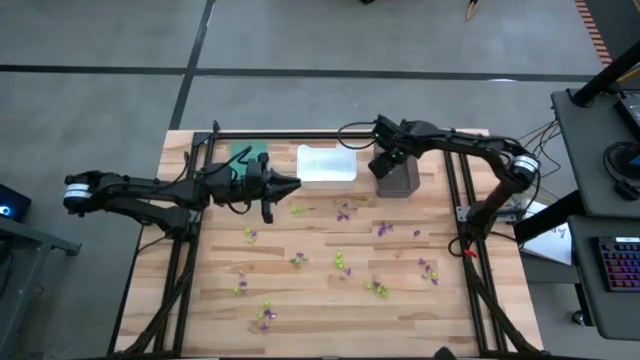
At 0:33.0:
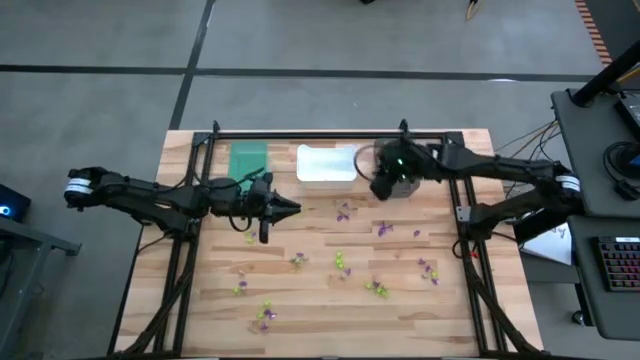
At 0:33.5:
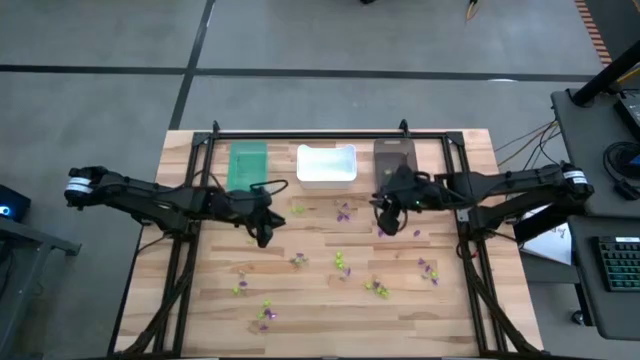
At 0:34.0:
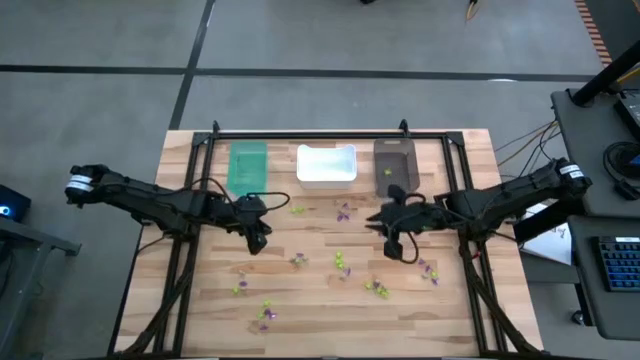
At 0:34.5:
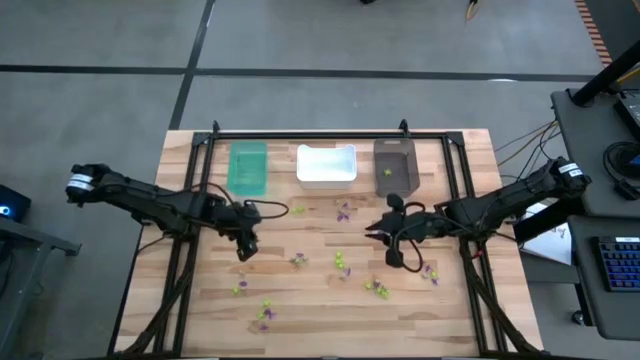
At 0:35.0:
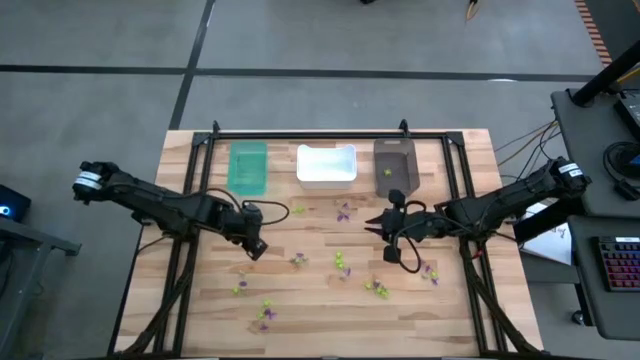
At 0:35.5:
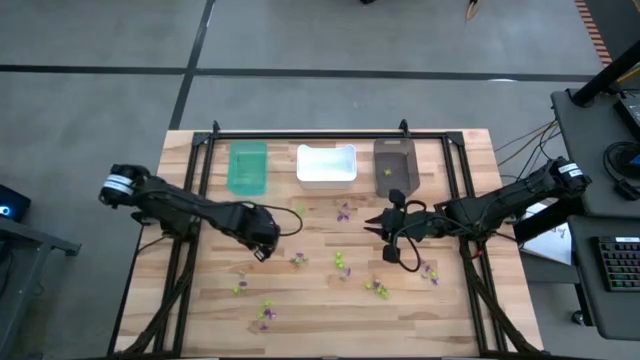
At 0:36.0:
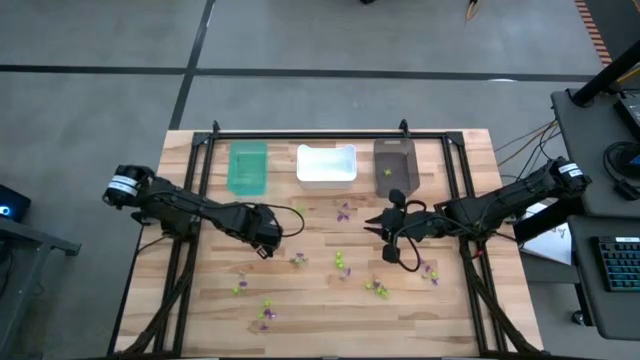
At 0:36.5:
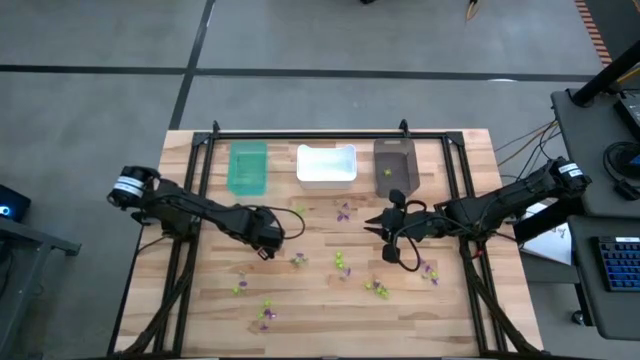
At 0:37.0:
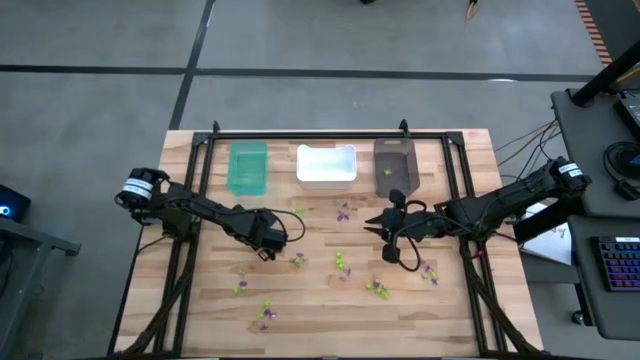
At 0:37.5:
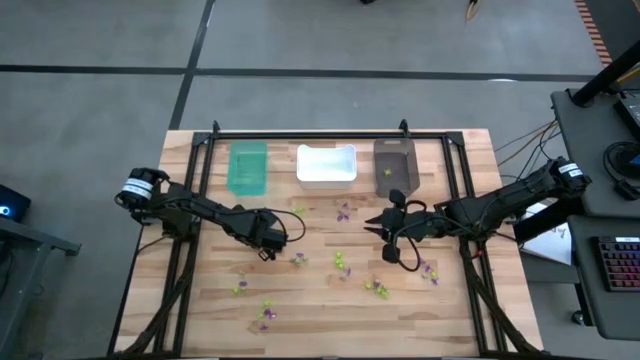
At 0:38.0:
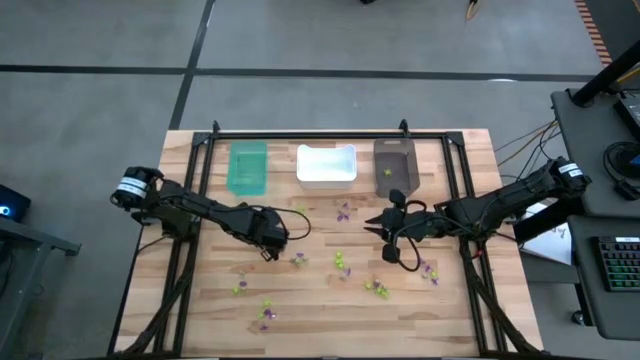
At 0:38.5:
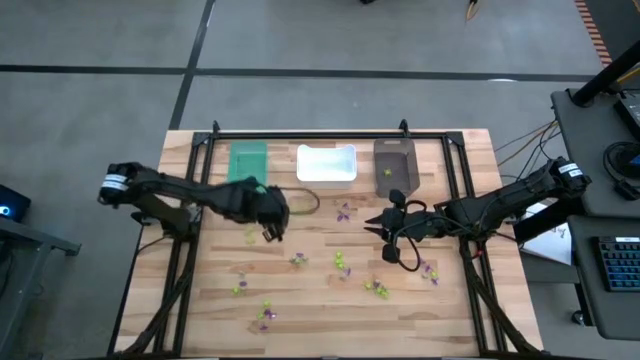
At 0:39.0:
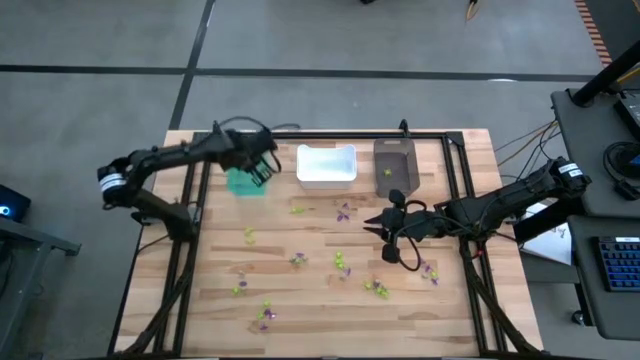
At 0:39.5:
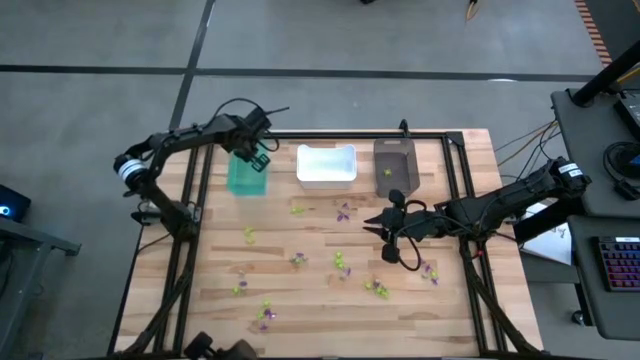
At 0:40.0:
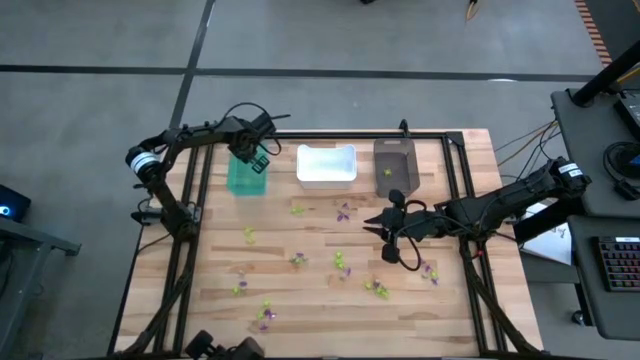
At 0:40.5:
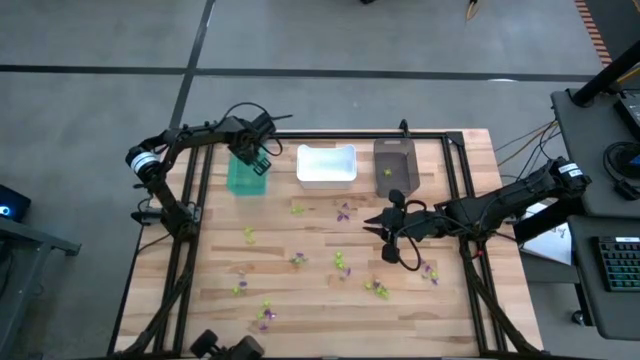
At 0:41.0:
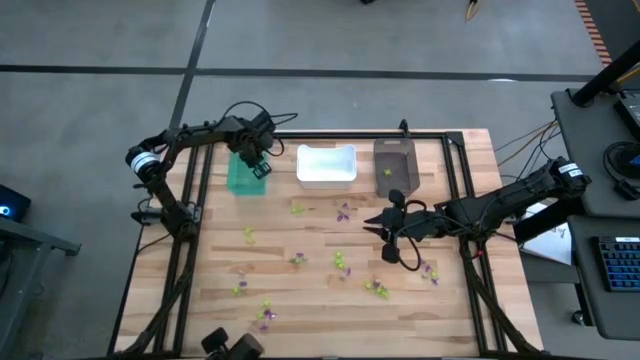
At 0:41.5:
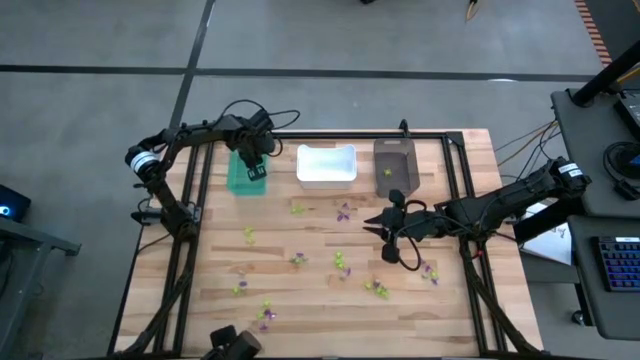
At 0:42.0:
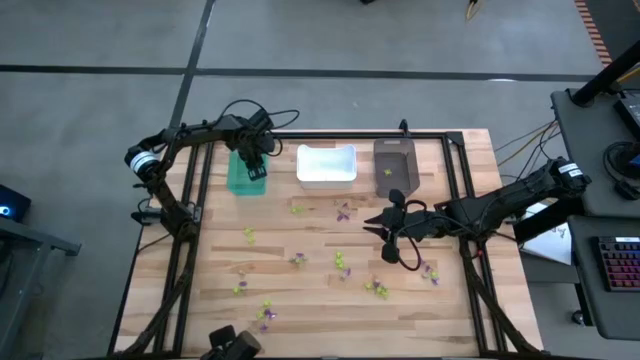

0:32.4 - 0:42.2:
Task: Sort Halloween decoration
Put the purple witch hat toy into the light blue bin

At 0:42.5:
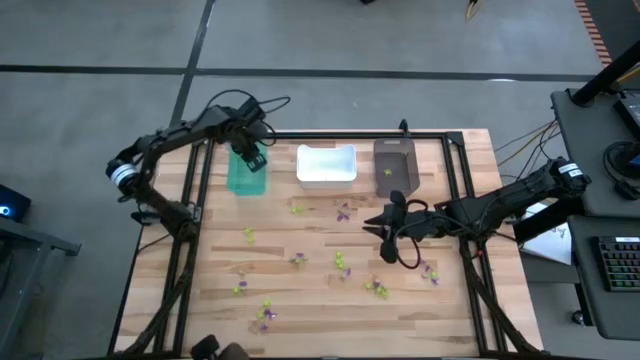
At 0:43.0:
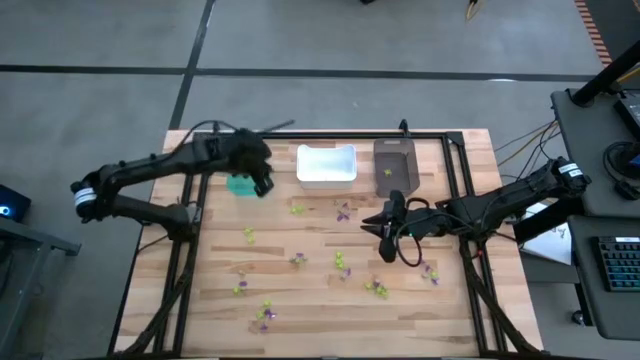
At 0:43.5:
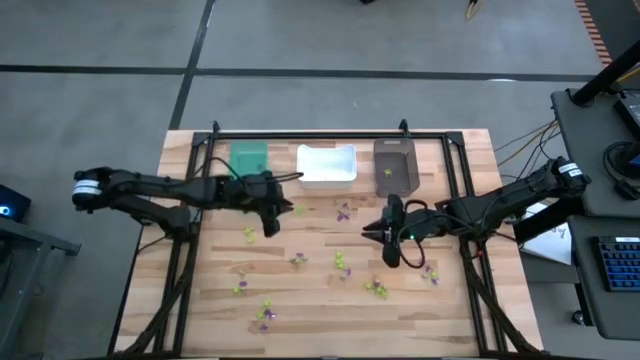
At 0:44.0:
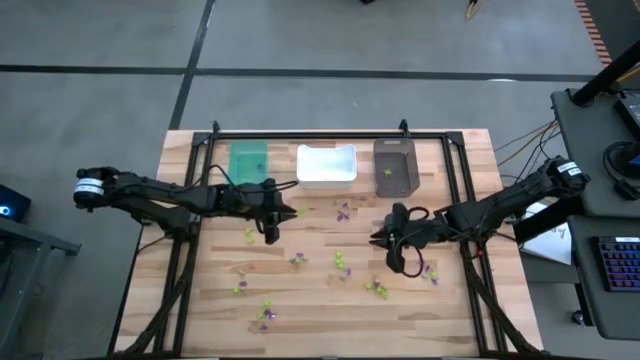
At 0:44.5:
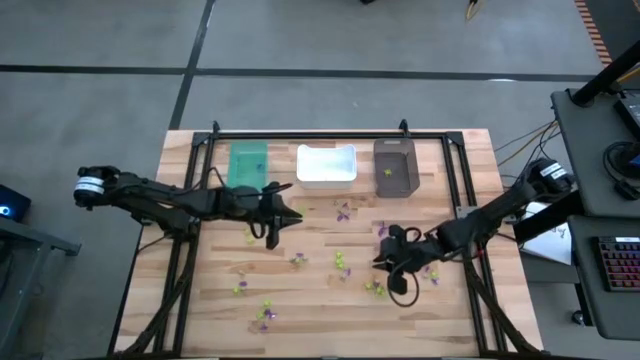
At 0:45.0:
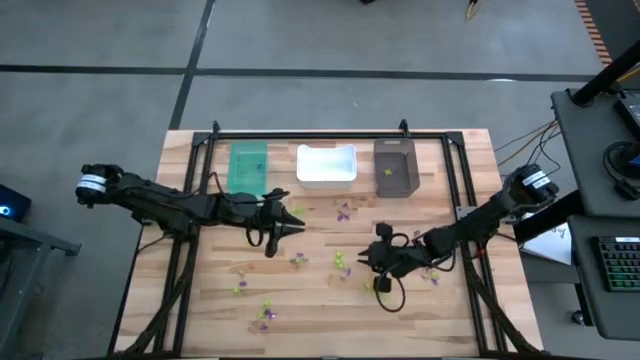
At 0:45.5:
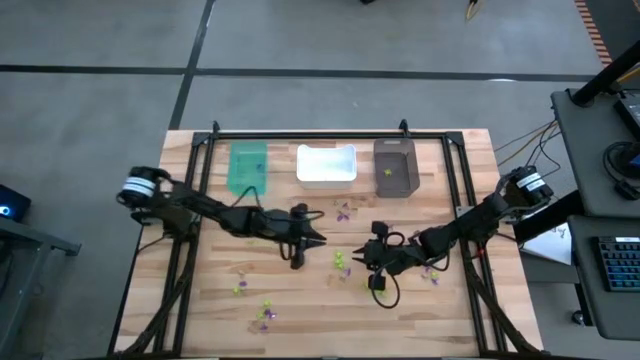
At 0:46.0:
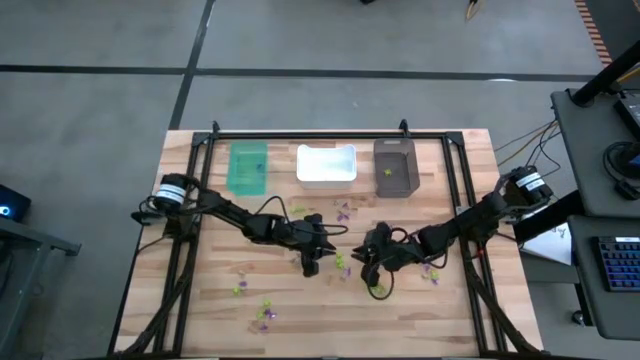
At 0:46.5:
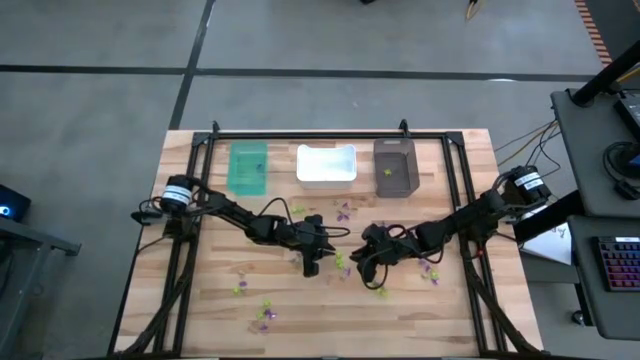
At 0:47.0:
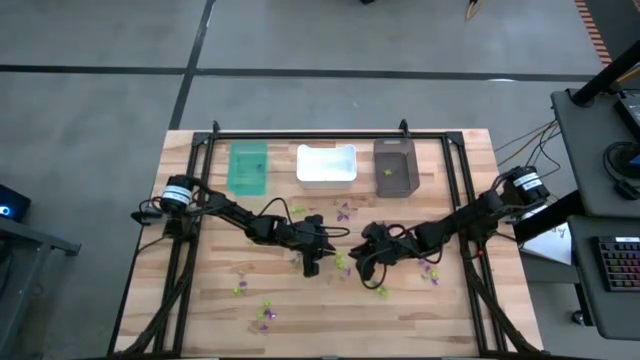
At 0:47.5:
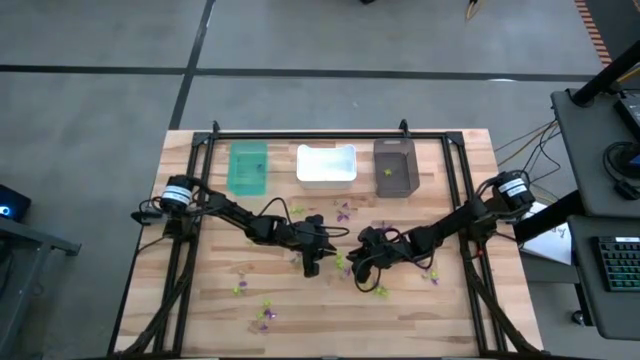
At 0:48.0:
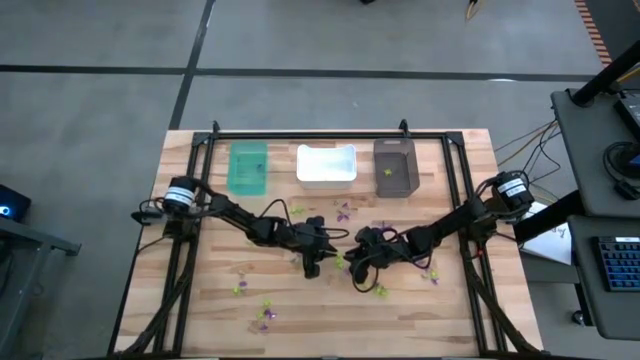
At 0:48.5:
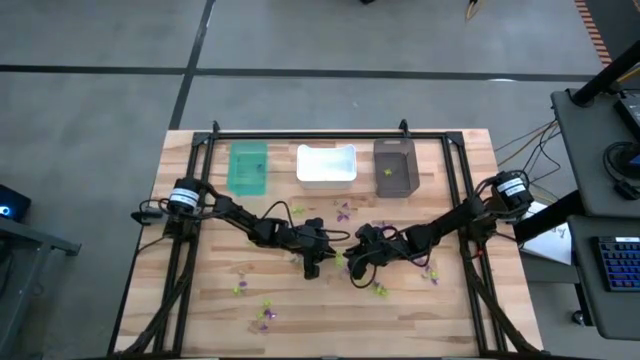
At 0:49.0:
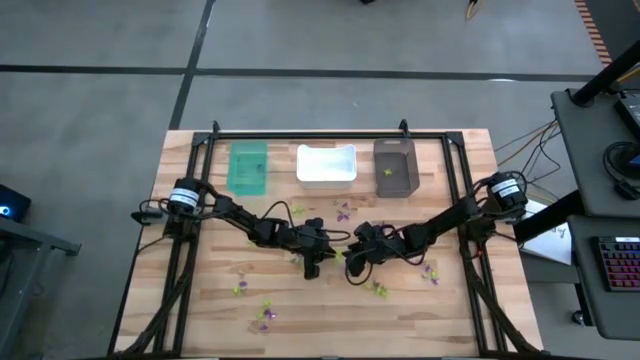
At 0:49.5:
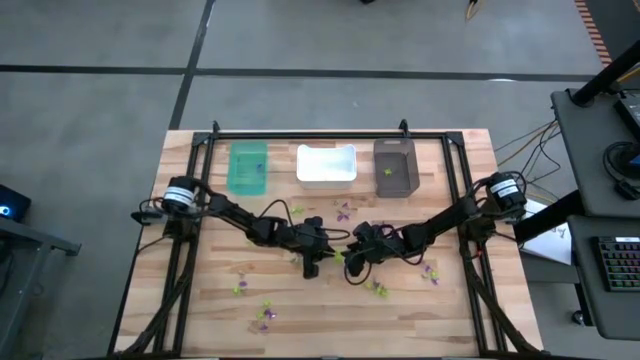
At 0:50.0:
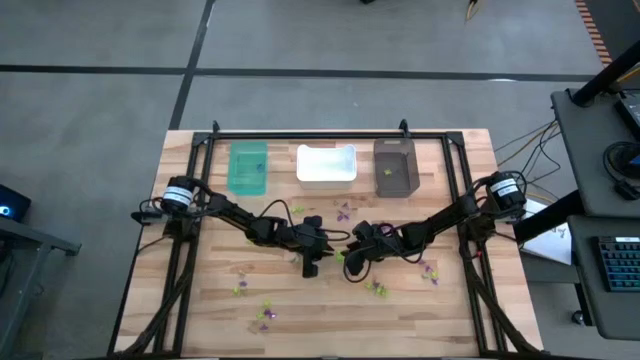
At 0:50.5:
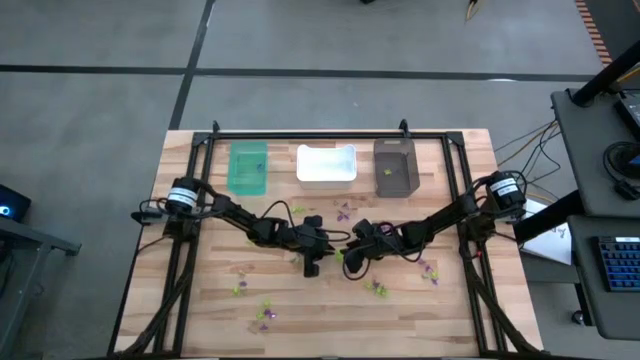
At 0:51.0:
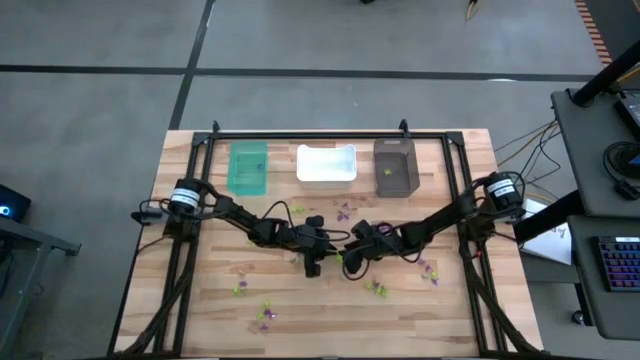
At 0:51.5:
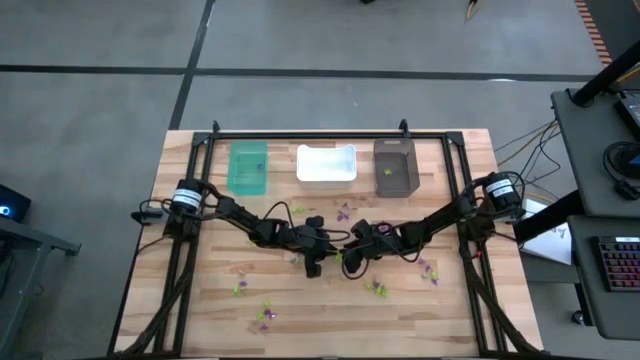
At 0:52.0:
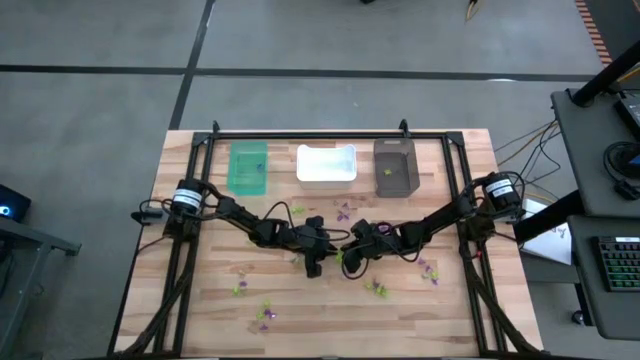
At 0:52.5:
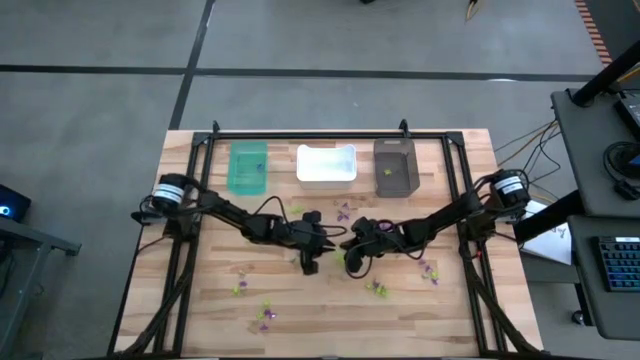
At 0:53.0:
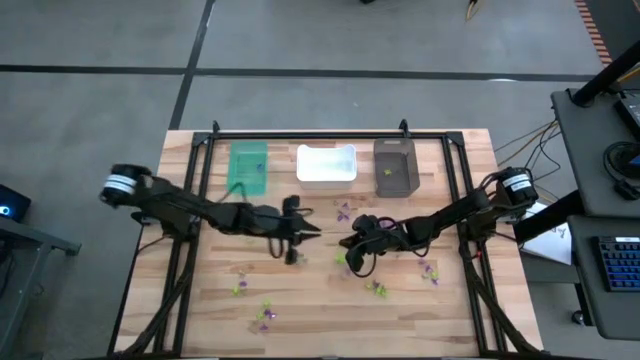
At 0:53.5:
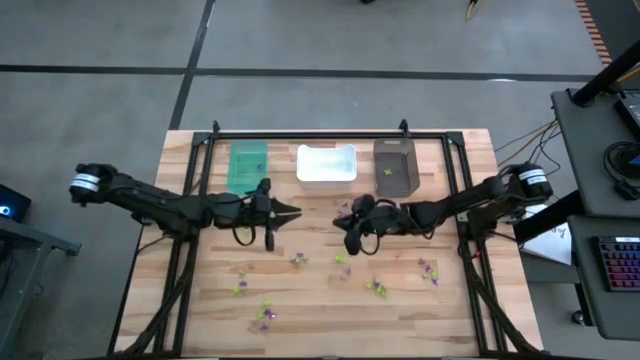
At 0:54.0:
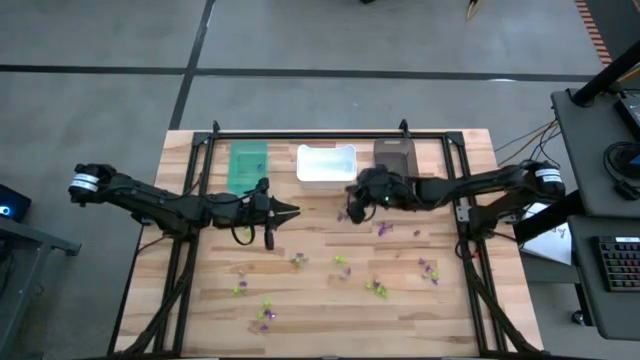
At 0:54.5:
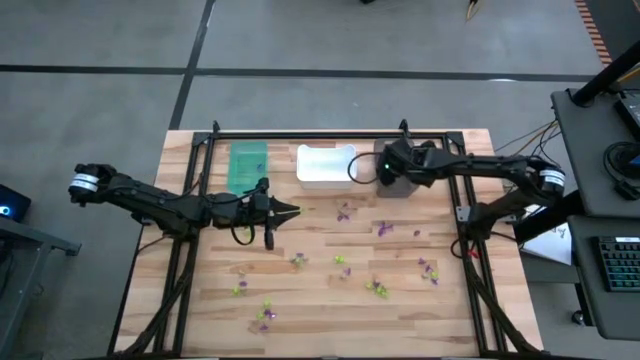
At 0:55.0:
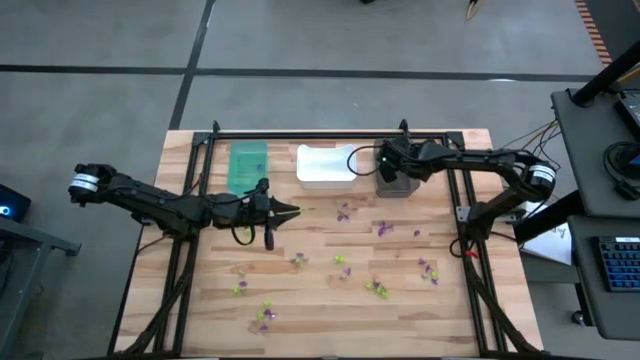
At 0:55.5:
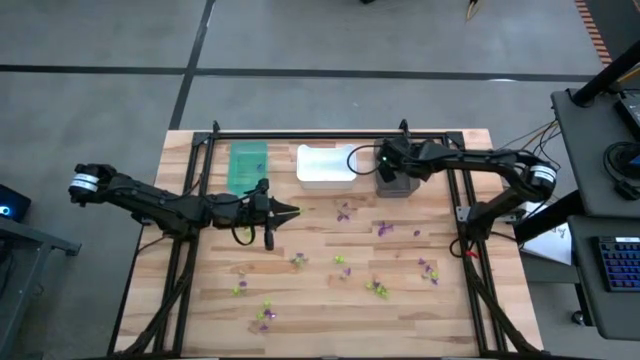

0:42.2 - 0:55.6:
Put the green spider toy into the black bin
